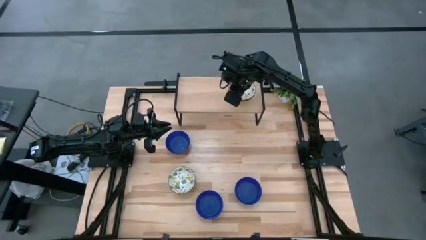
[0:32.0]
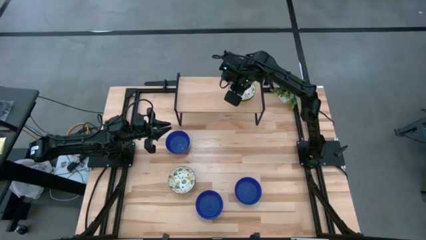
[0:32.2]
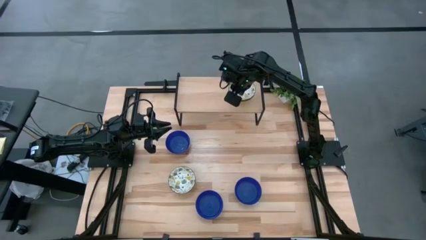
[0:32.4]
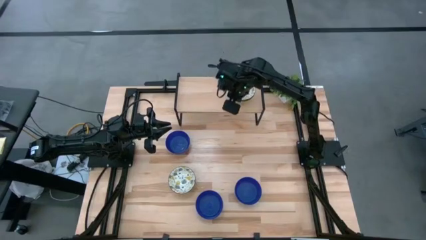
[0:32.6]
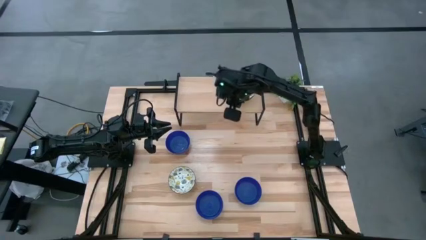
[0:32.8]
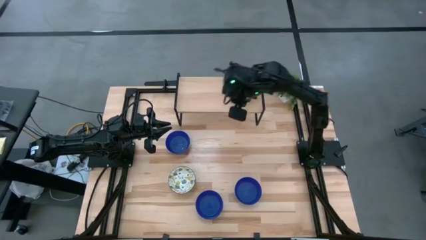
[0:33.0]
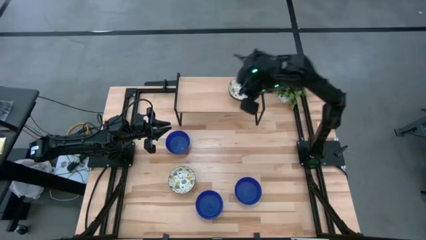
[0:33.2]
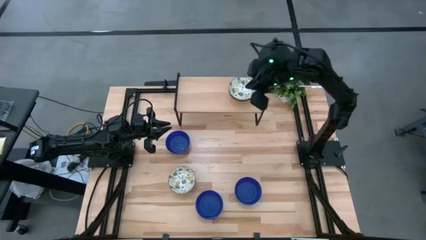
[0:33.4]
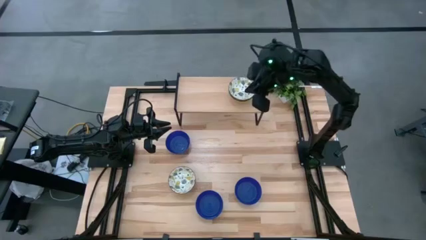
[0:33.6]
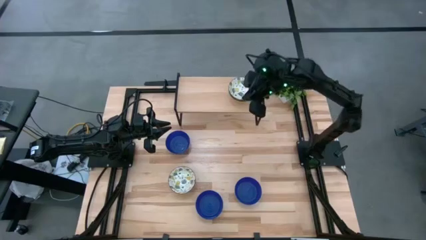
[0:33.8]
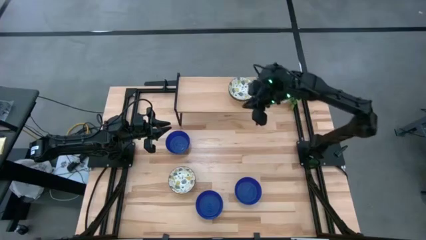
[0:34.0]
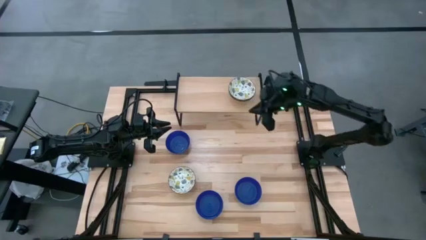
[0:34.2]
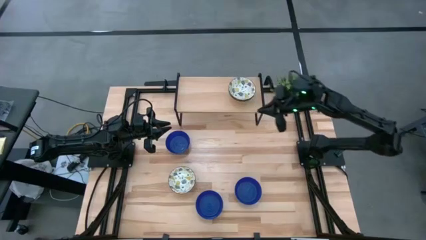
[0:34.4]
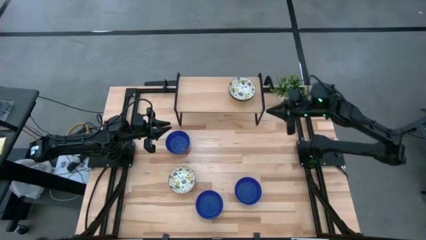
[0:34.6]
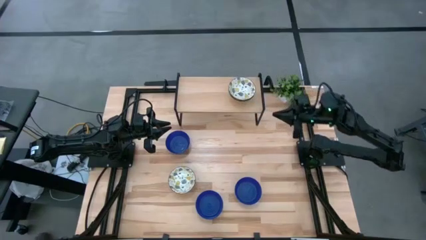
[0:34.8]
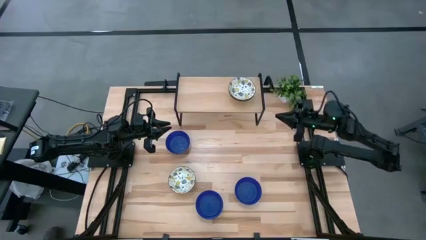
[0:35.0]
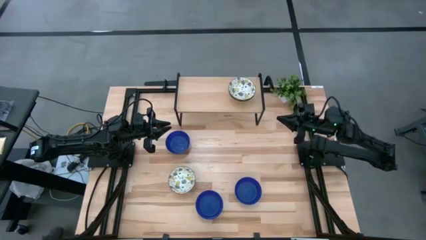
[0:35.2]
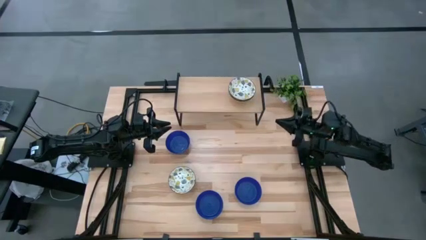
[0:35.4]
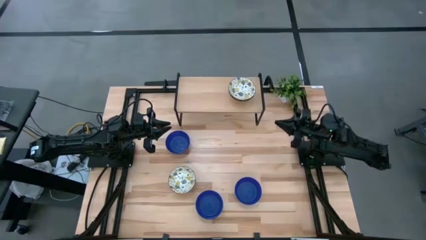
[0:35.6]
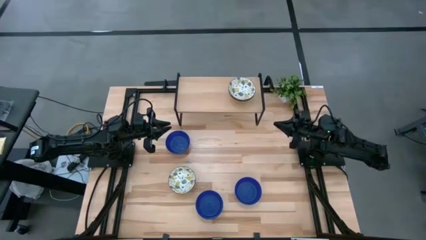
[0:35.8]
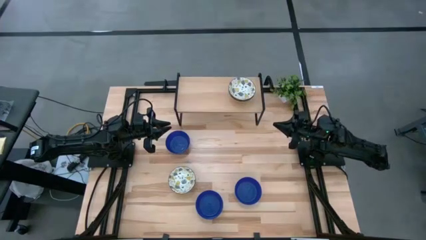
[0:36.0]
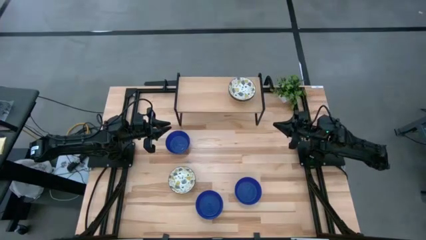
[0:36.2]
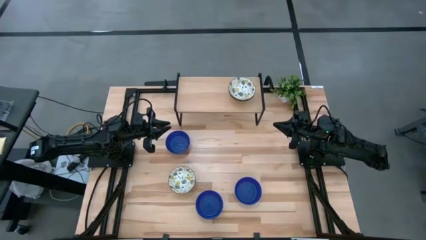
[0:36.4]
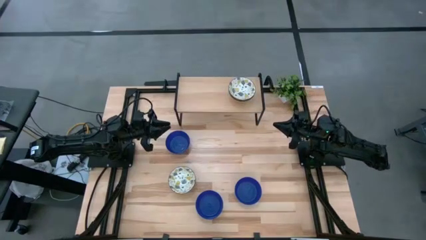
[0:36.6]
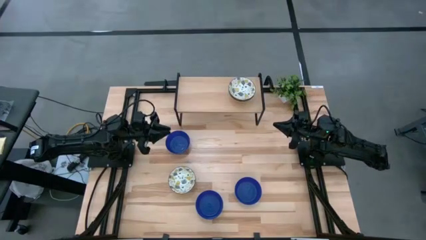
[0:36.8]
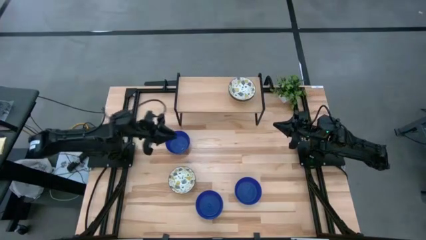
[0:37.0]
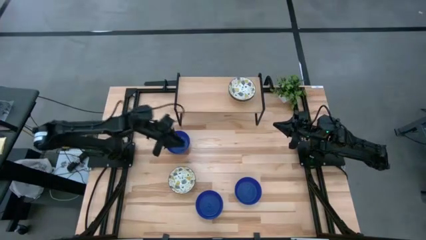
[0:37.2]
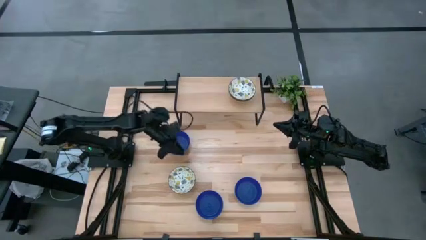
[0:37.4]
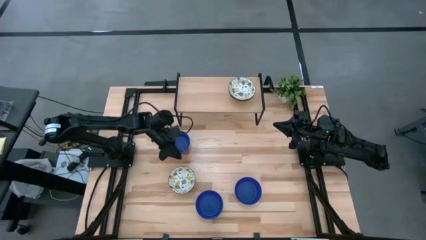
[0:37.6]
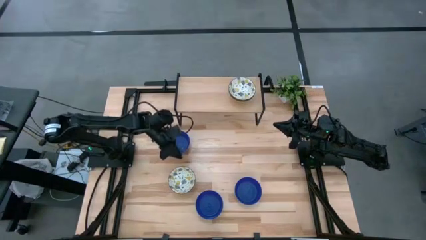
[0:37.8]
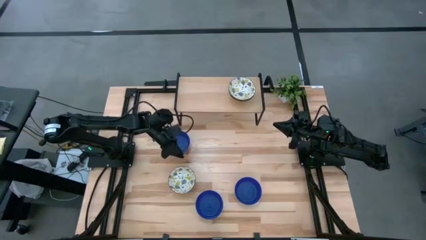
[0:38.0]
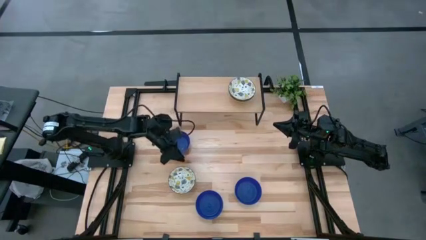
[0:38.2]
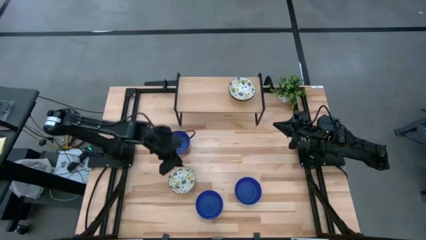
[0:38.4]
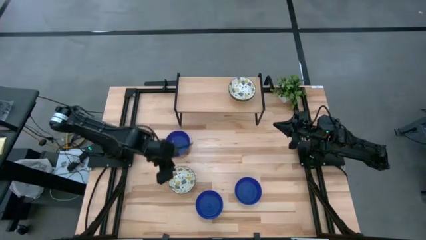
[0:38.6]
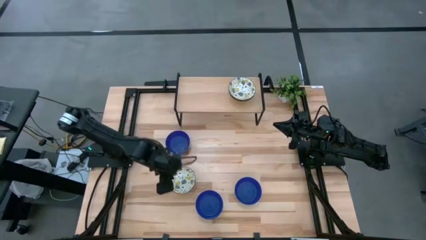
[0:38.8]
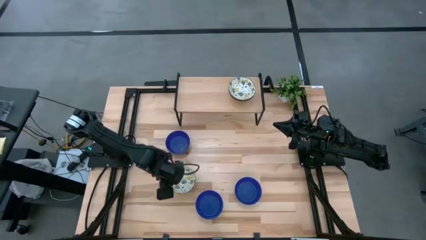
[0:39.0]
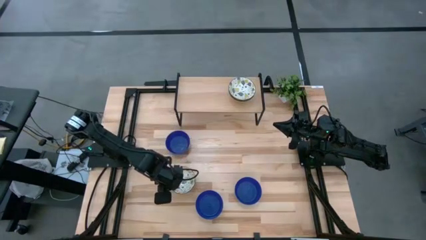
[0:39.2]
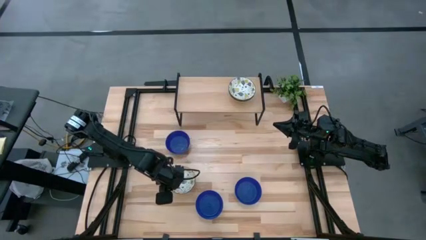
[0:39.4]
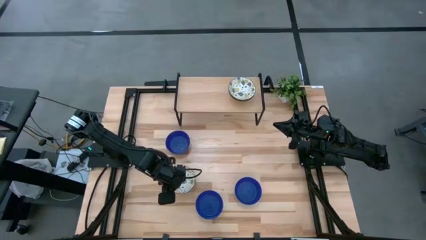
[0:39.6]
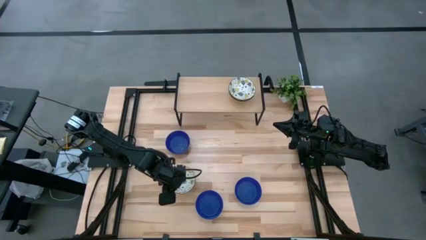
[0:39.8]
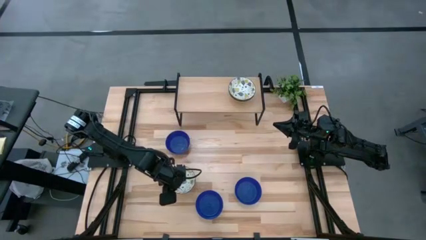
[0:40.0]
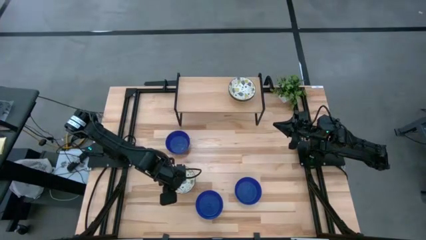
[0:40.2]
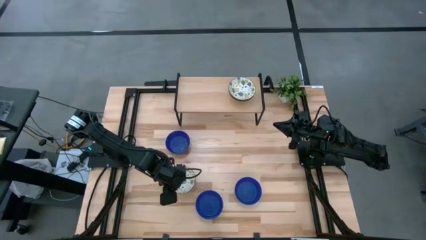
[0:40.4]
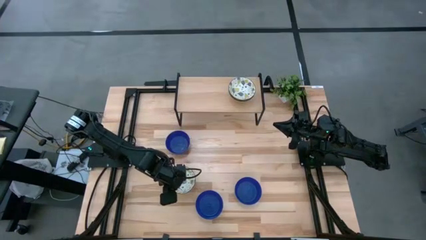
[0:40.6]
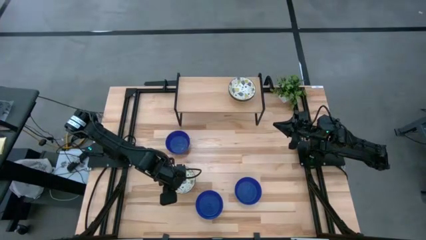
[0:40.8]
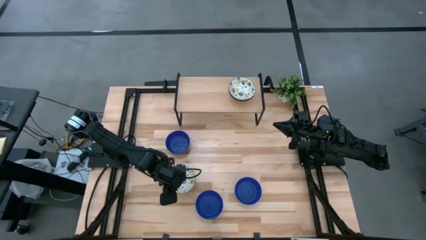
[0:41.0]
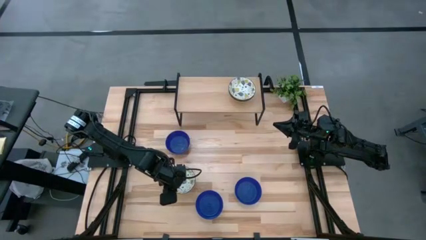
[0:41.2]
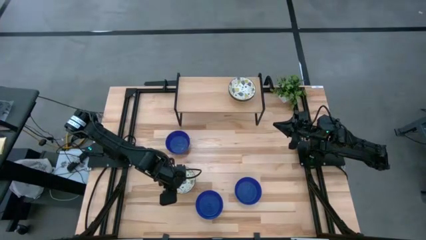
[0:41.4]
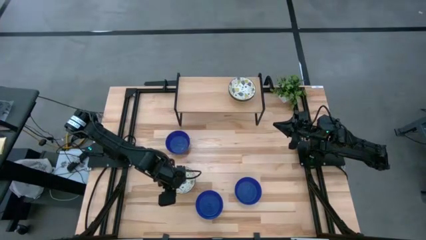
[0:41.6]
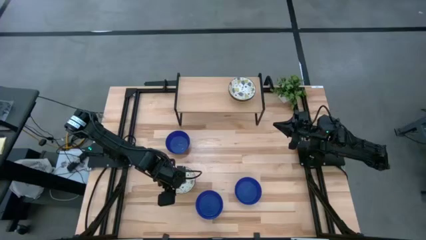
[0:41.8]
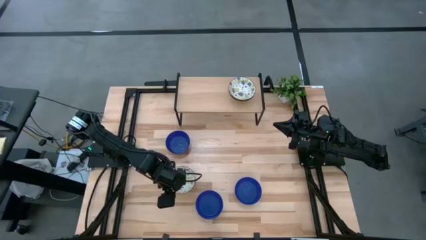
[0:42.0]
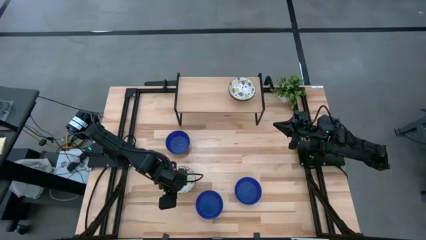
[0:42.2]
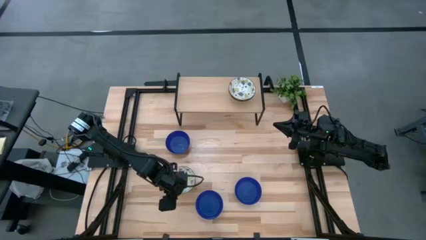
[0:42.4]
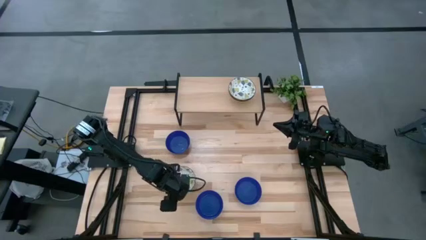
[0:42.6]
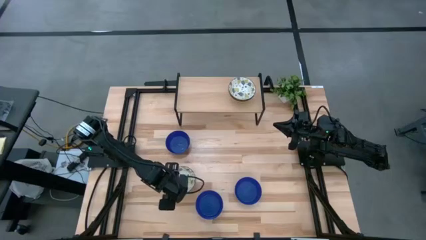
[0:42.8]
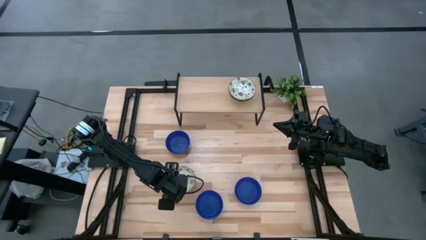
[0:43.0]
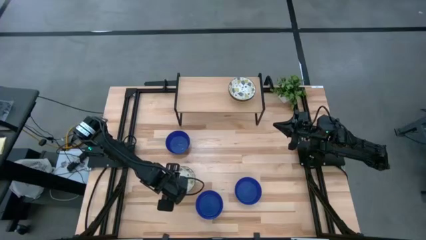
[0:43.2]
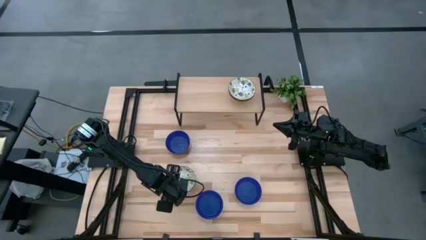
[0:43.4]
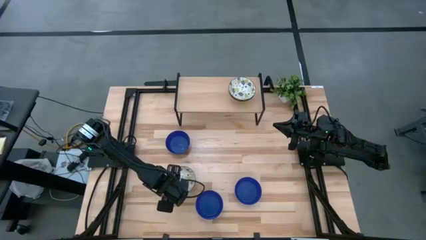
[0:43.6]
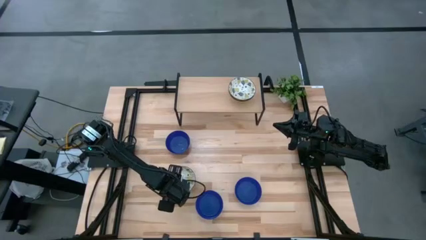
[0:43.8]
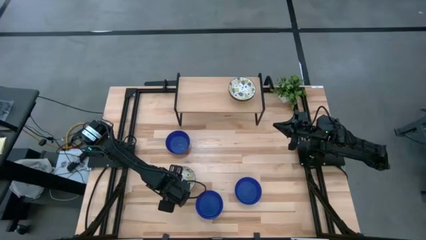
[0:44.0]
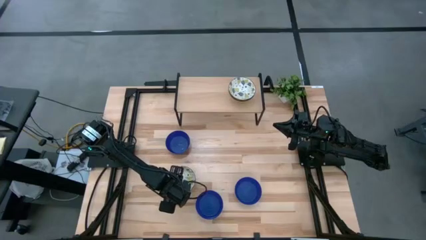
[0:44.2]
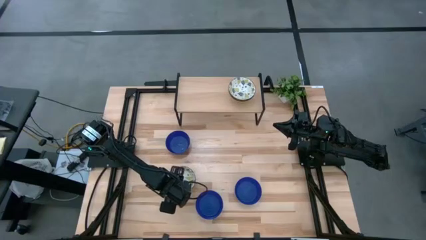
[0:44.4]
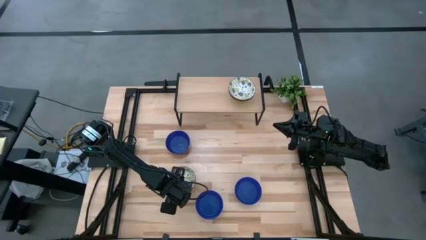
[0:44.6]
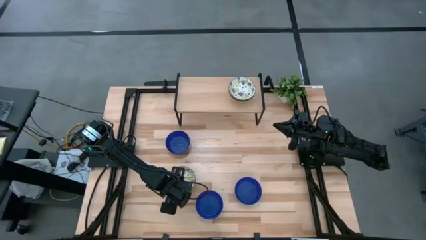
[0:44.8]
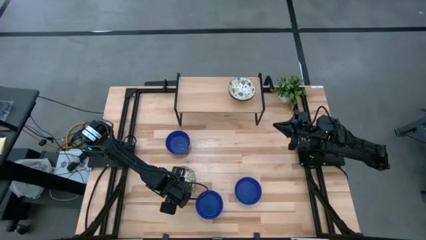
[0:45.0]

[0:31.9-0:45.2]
Task: Pick & Place Mini bowls
Stack the white patterned bowl on top of the white patterned bowls on the shelf
